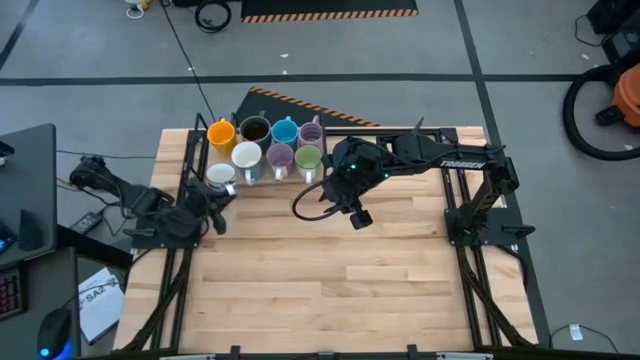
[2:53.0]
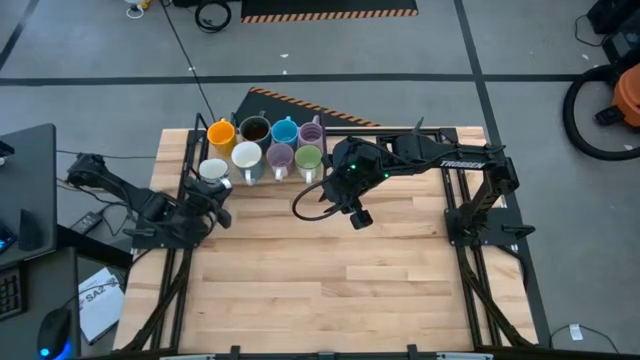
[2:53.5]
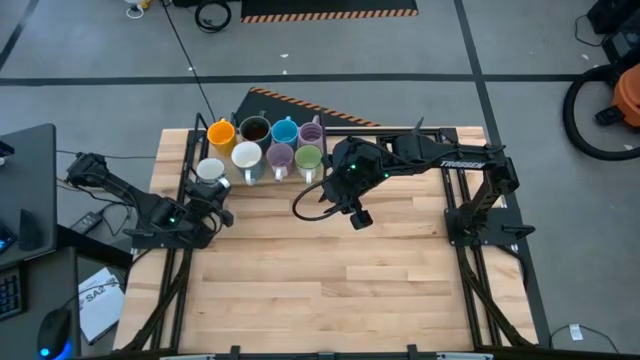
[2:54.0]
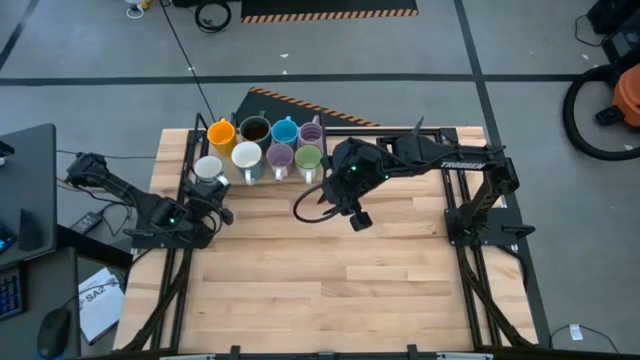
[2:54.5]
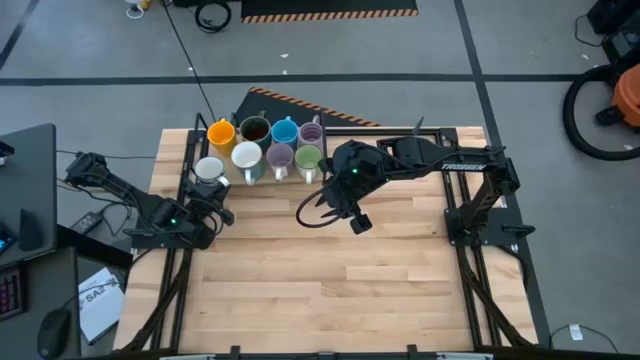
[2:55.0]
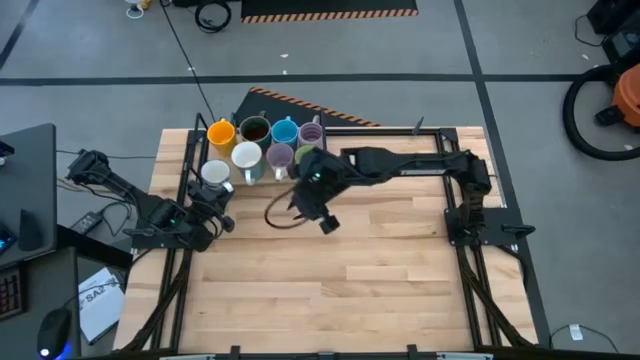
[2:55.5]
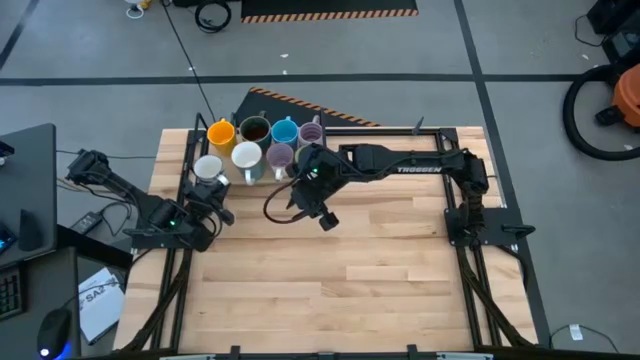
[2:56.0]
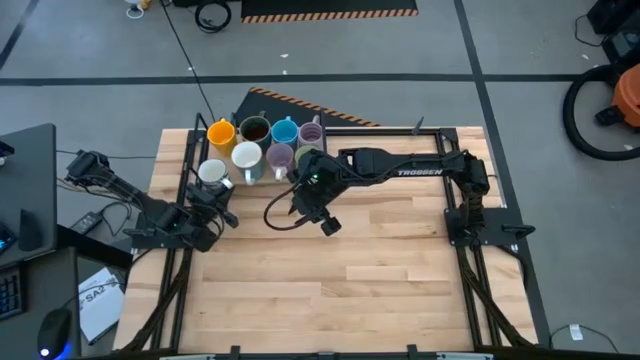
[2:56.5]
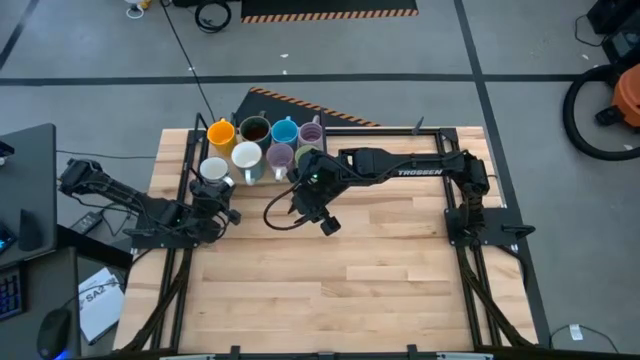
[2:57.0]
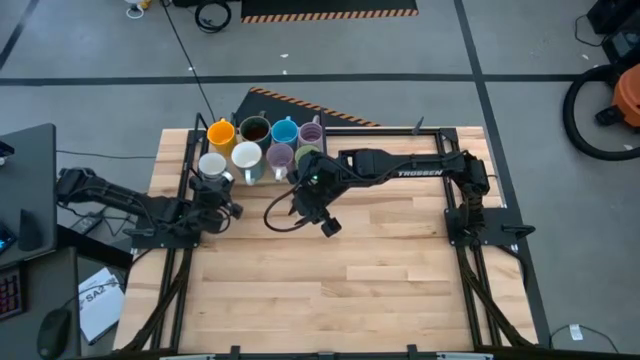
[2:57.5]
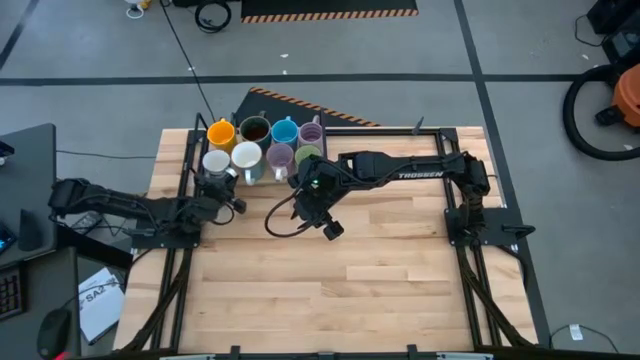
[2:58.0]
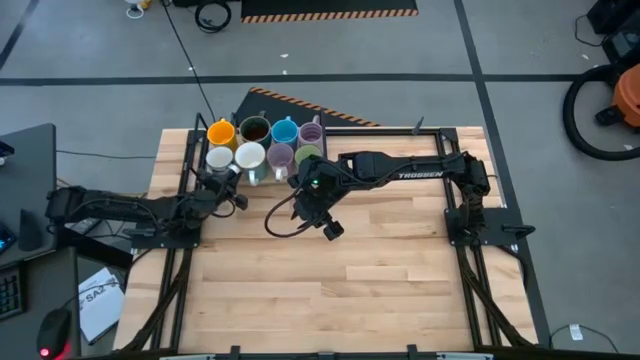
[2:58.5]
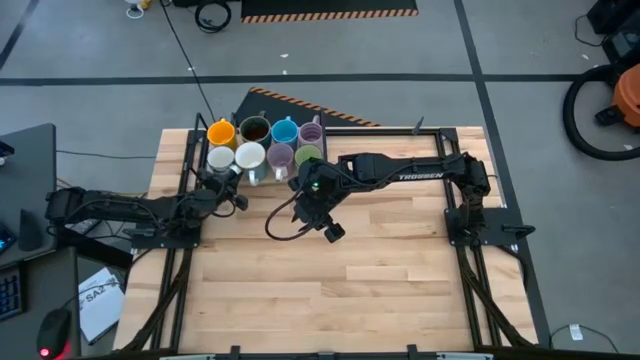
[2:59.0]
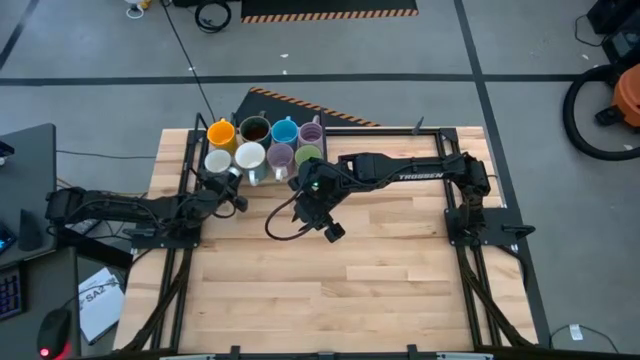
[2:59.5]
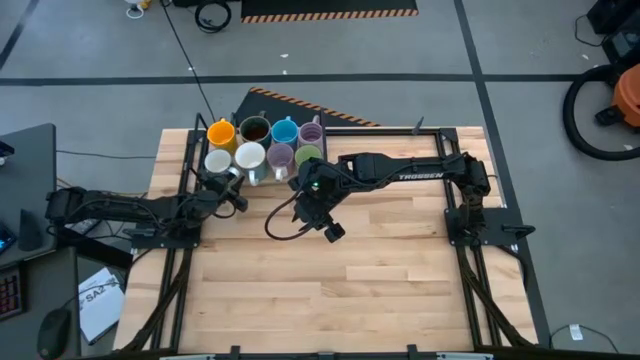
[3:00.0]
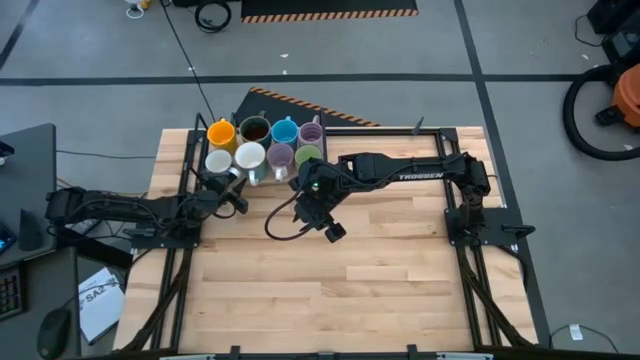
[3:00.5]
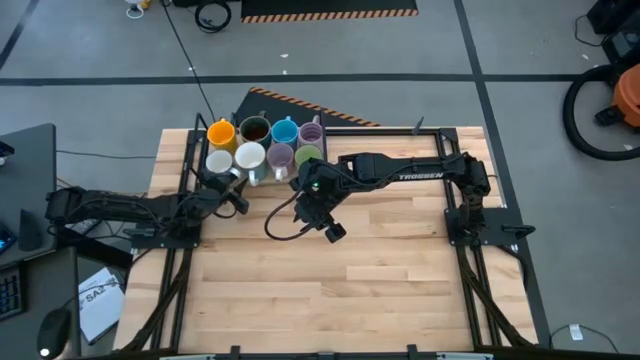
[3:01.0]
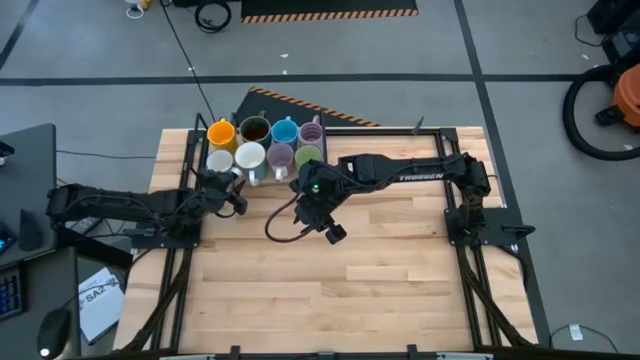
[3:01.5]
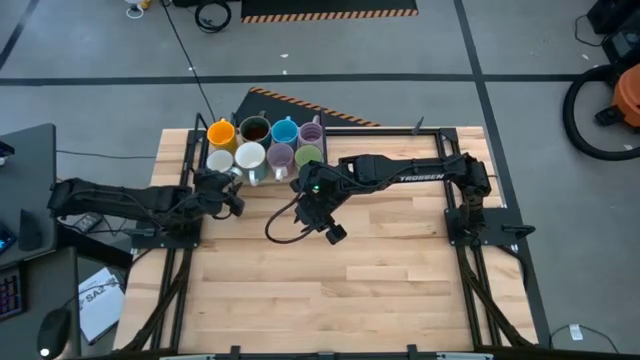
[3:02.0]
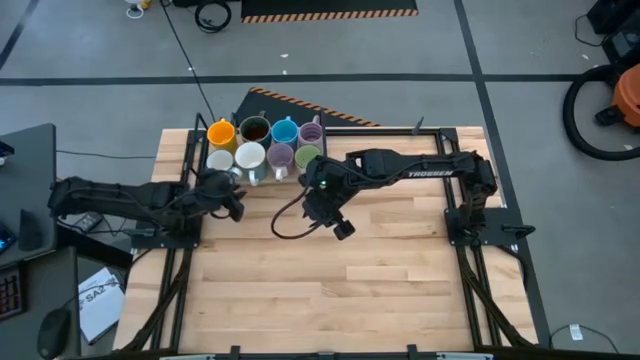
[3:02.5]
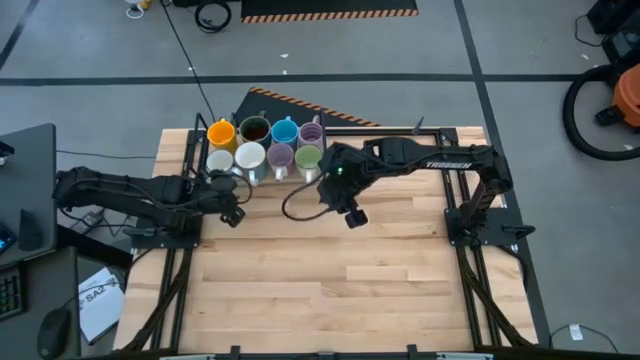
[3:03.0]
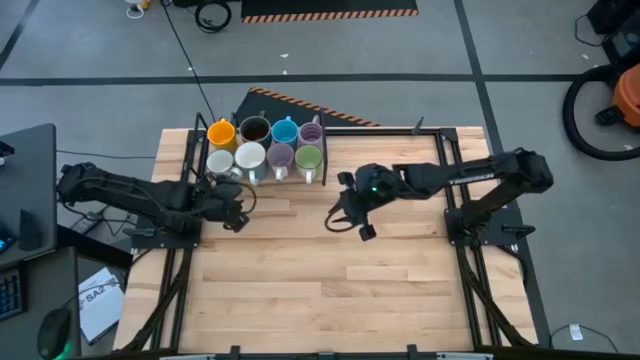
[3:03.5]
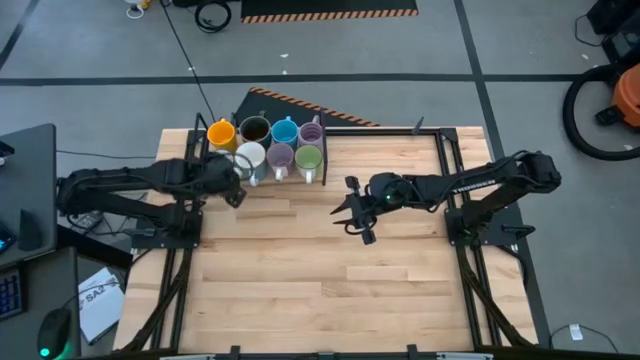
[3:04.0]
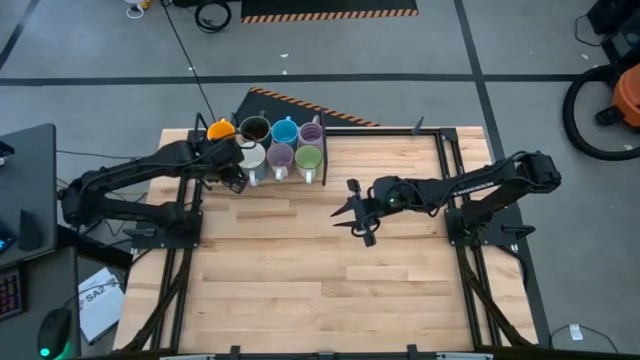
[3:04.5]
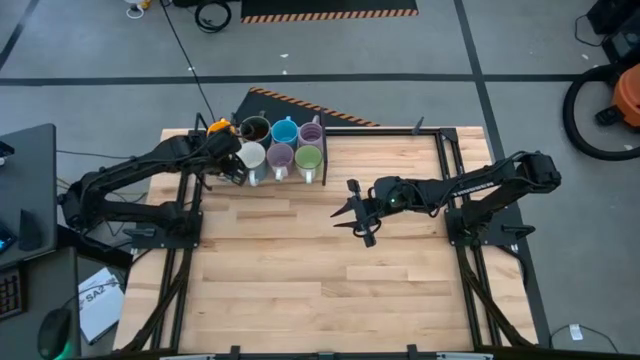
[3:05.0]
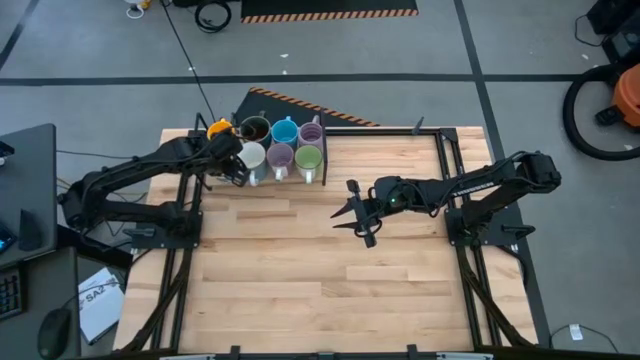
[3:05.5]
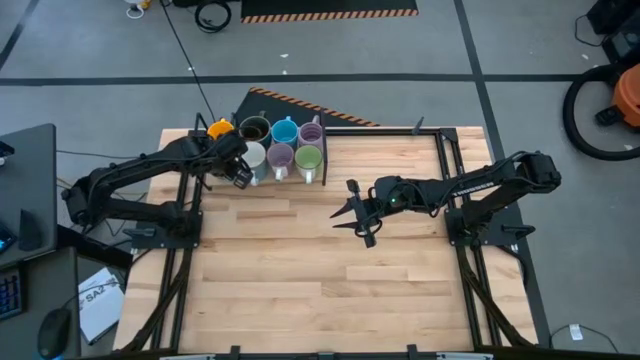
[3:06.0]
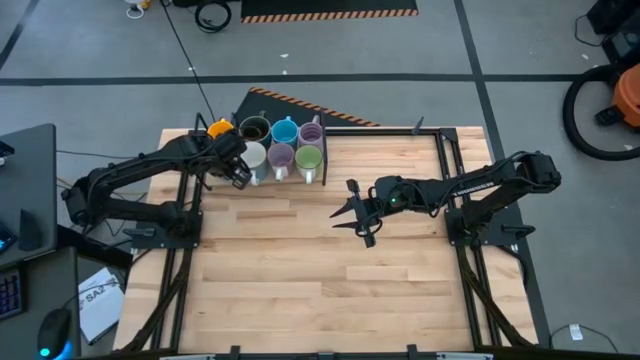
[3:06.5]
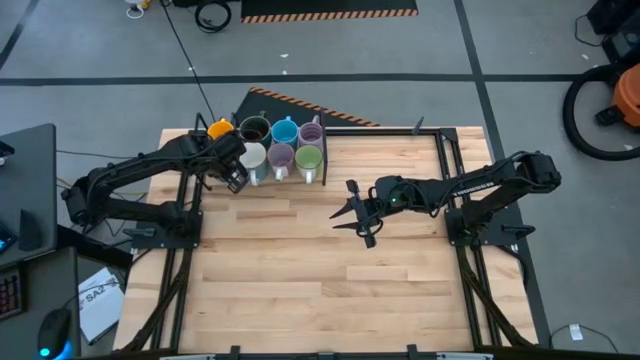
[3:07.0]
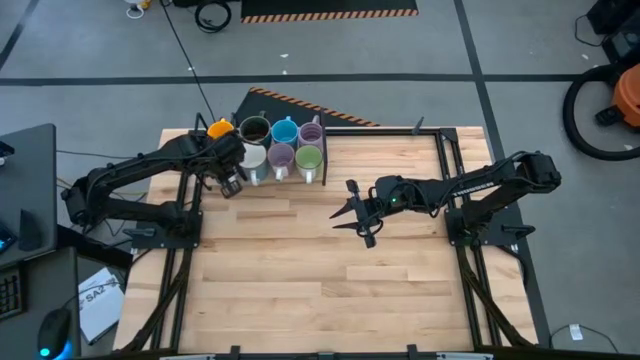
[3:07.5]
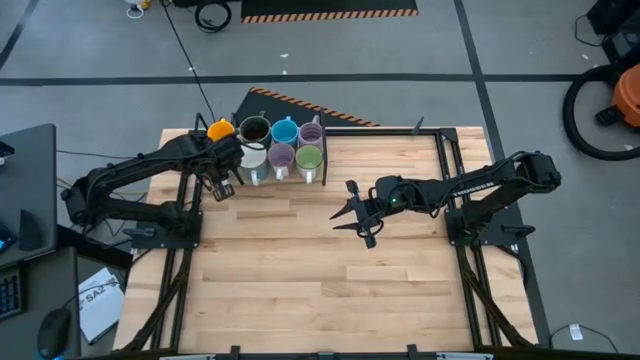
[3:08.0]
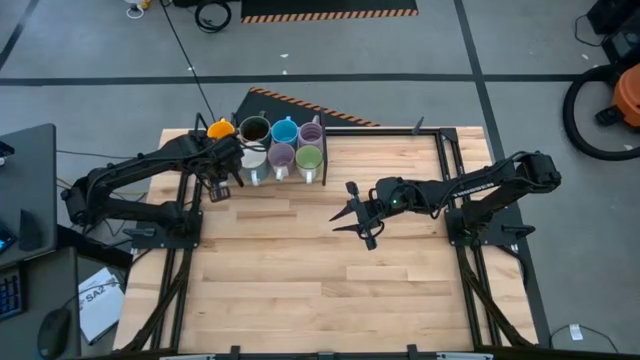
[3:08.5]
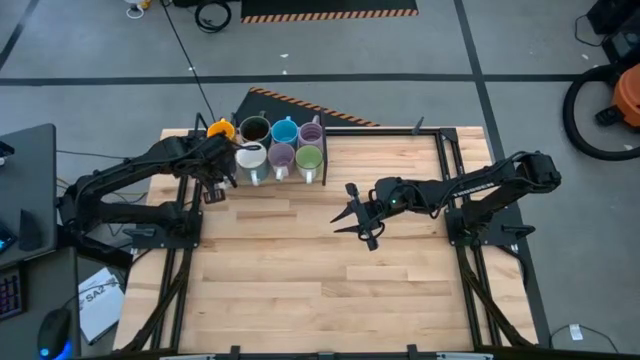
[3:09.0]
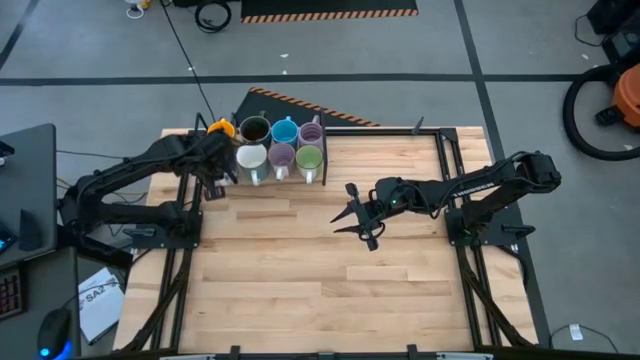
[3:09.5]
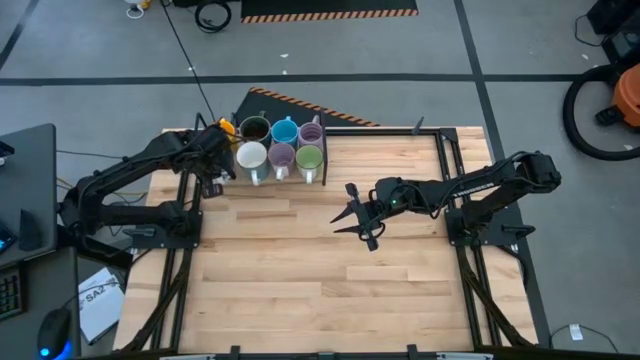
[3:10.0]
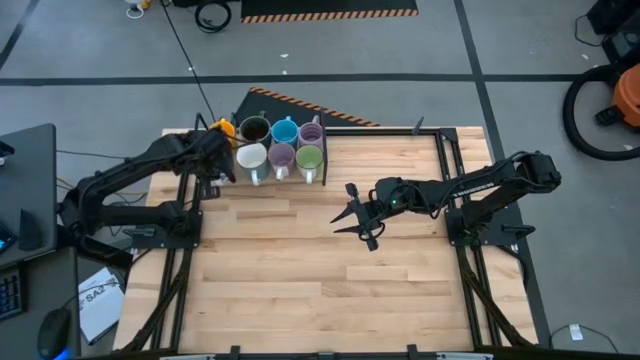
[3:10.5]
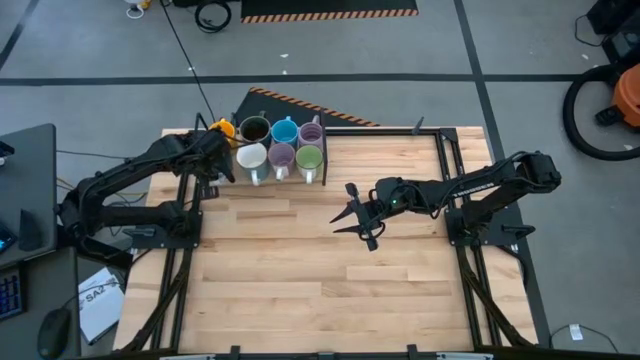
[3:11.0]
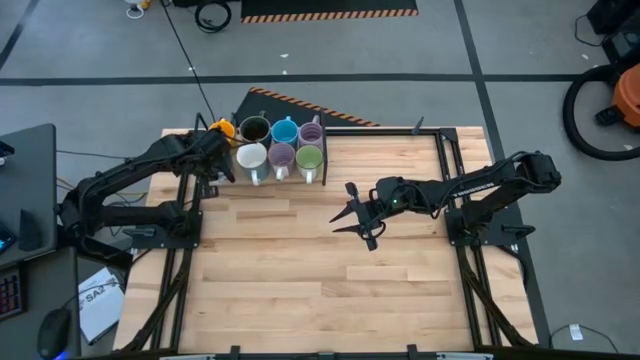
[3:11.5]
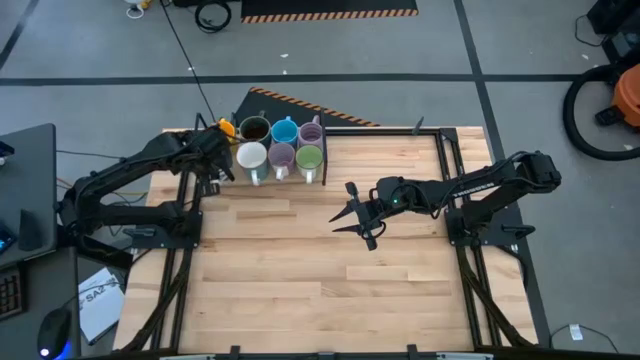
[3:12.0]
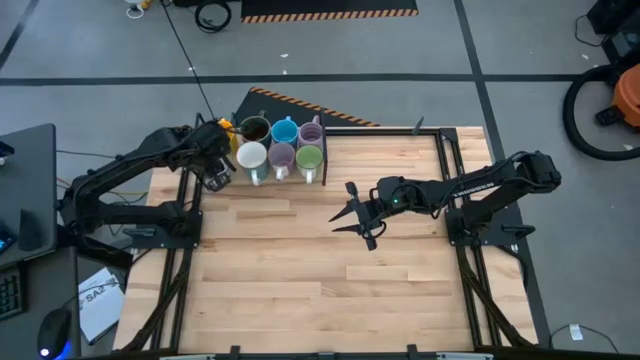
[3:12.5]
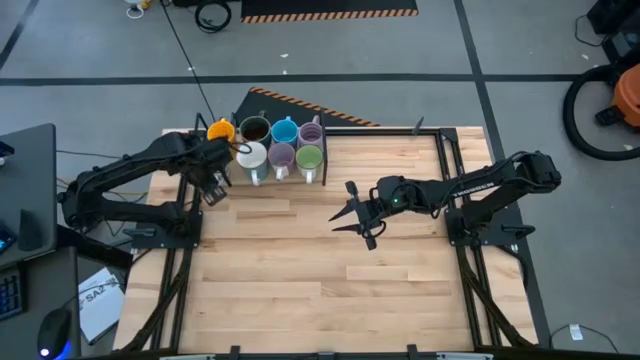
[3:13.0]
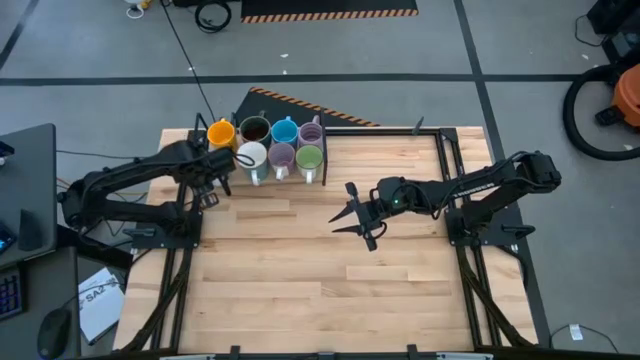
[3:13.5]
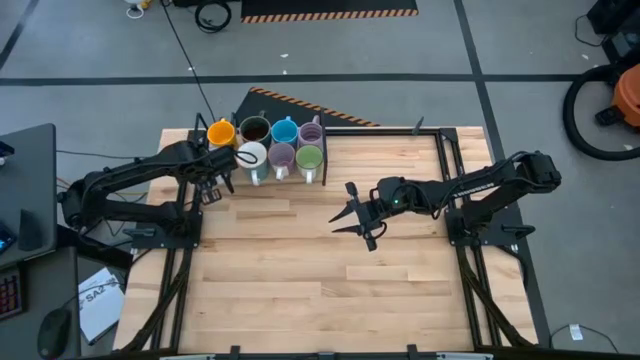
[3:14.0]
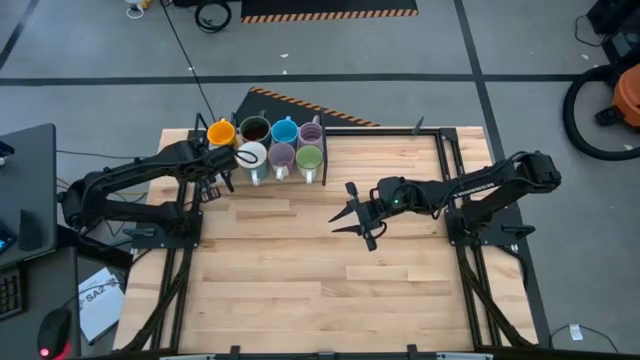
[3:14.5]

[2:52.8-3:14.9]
Task: Place coffee mugs
Put the blue patterned mug on the shelf
